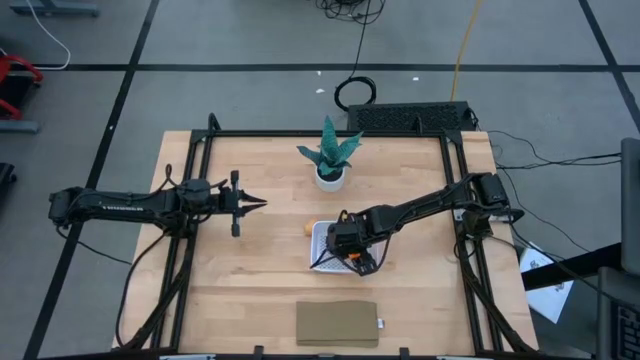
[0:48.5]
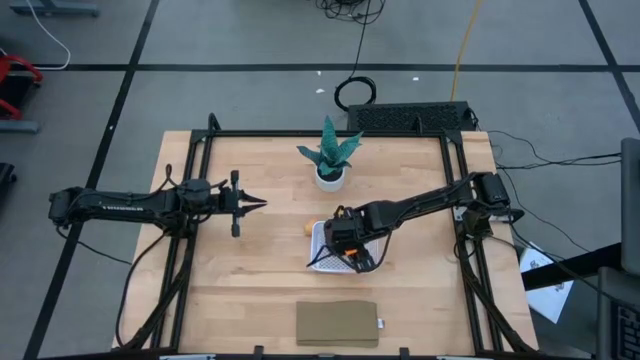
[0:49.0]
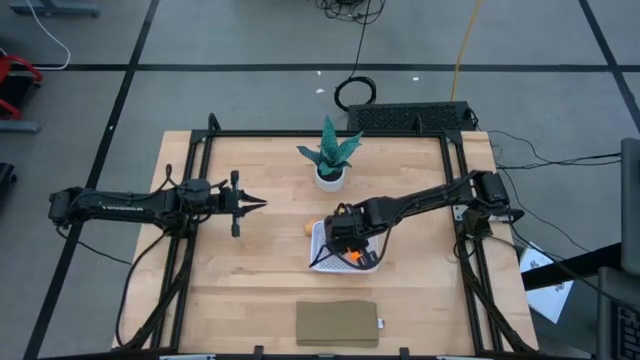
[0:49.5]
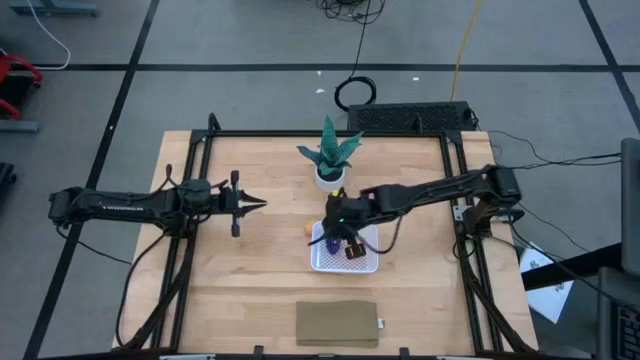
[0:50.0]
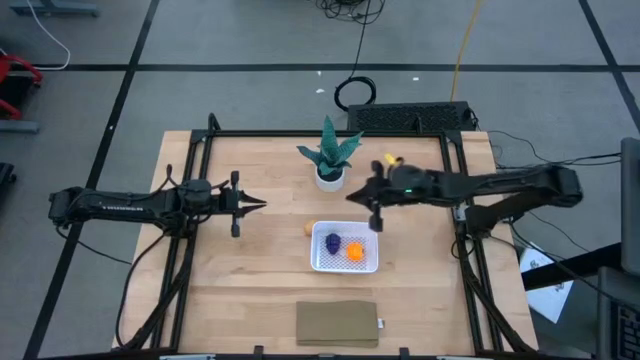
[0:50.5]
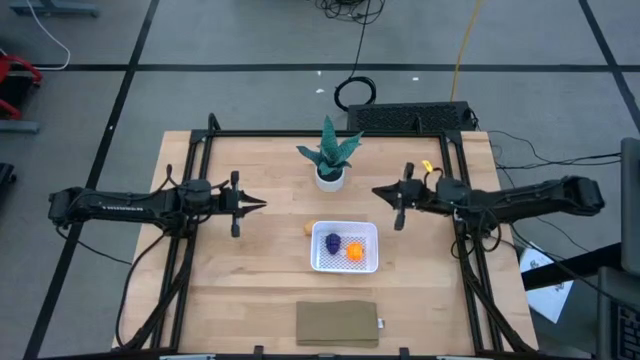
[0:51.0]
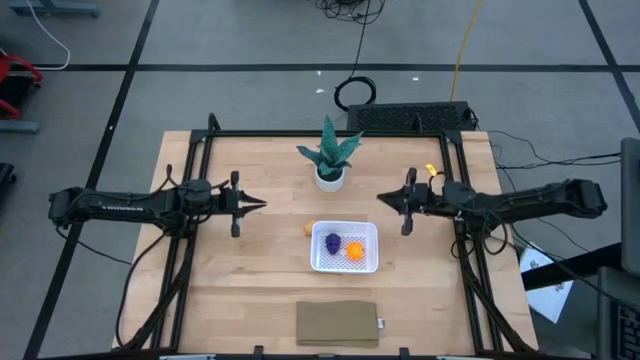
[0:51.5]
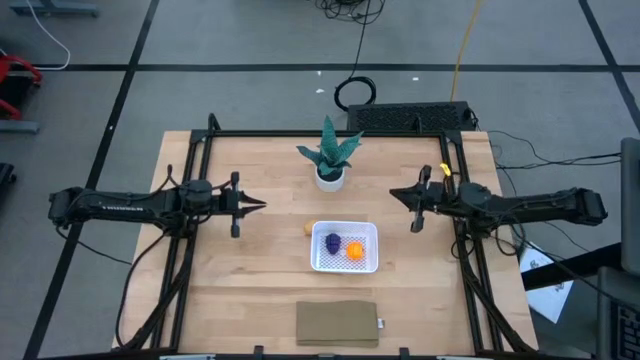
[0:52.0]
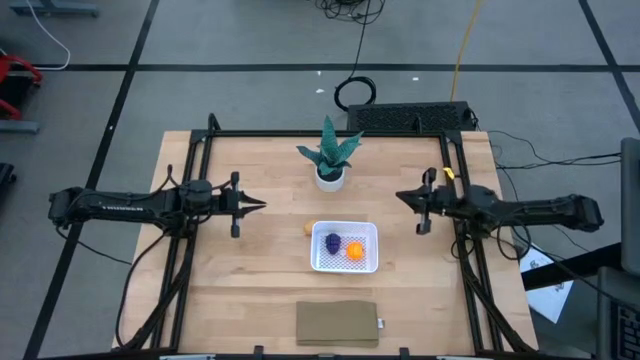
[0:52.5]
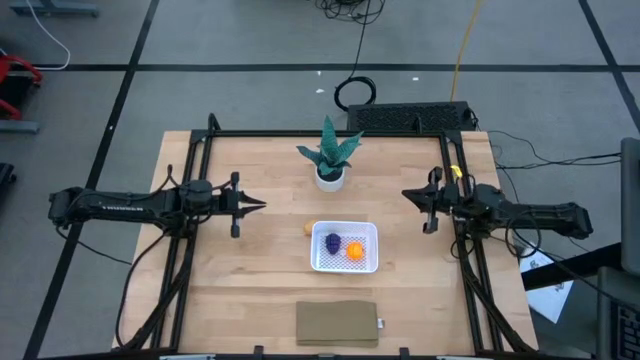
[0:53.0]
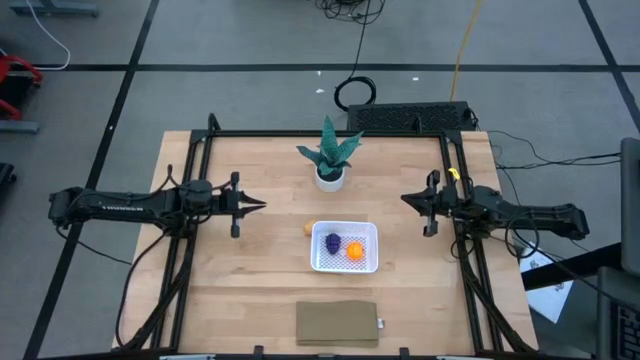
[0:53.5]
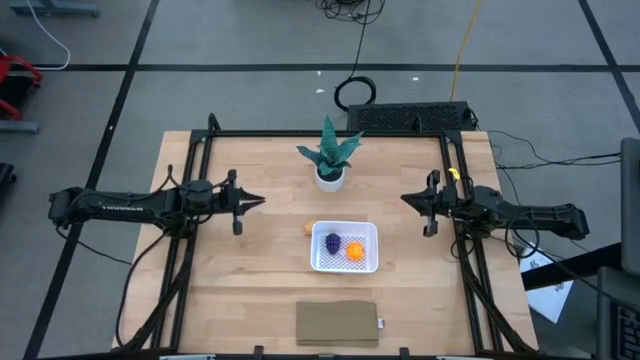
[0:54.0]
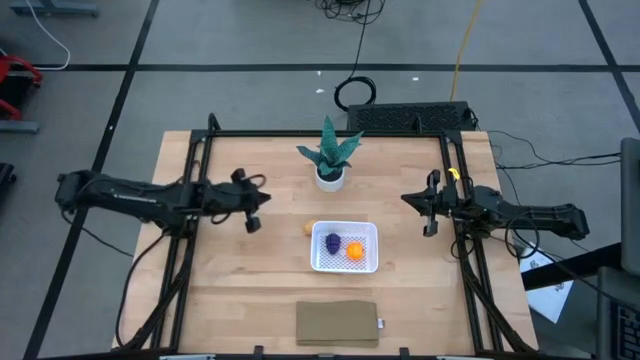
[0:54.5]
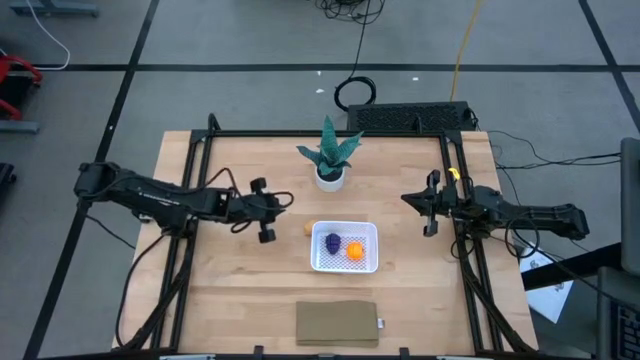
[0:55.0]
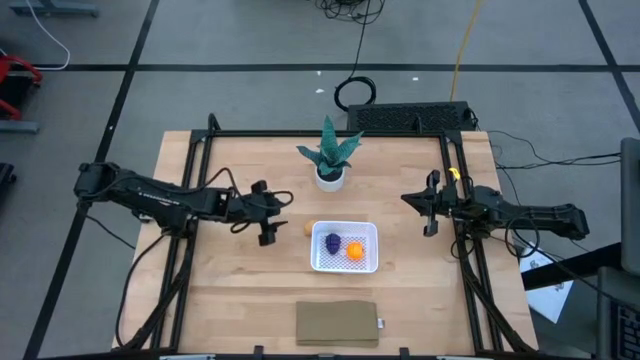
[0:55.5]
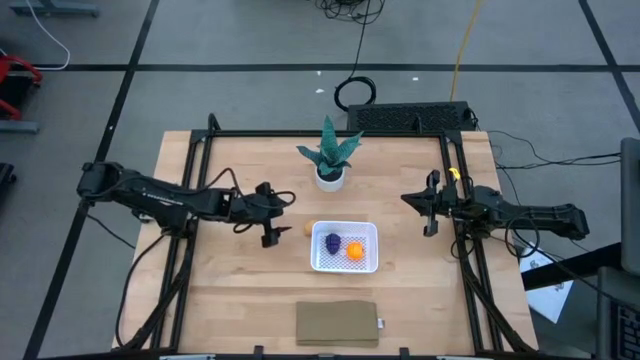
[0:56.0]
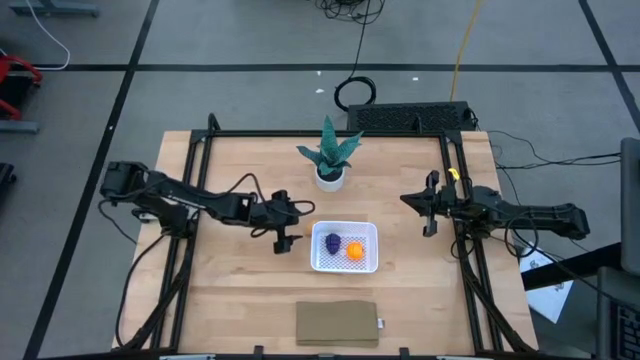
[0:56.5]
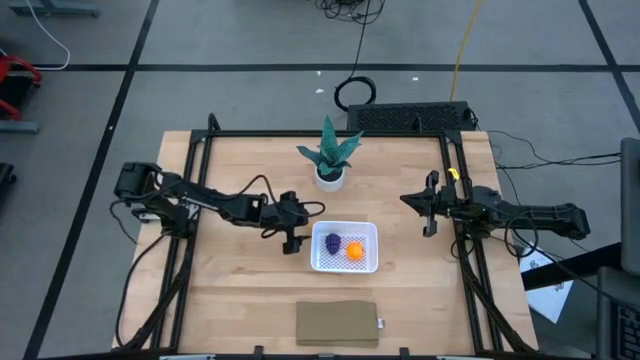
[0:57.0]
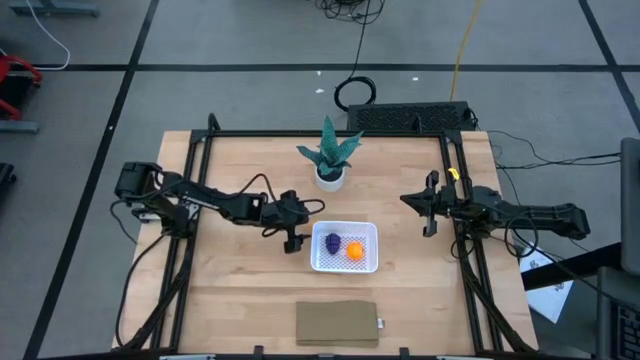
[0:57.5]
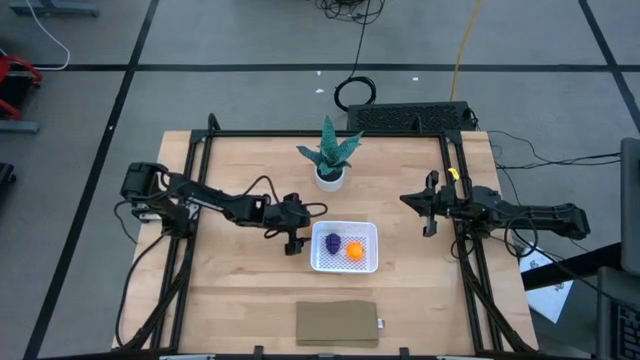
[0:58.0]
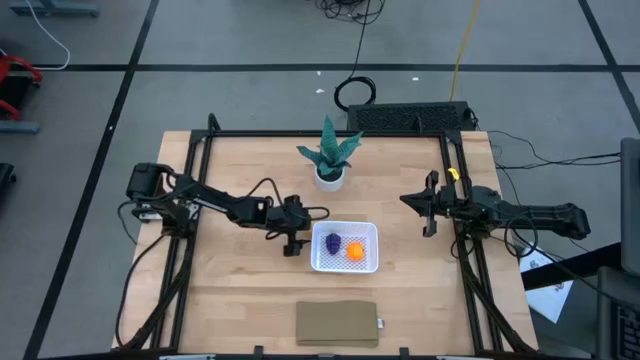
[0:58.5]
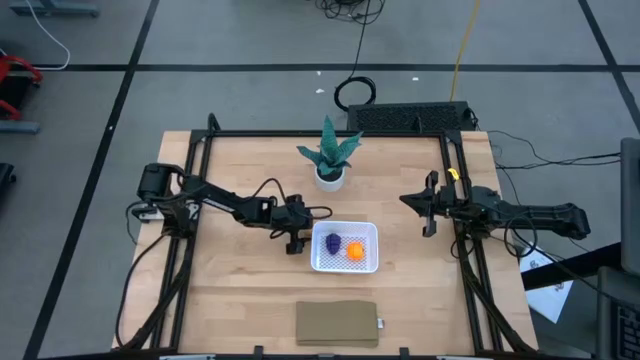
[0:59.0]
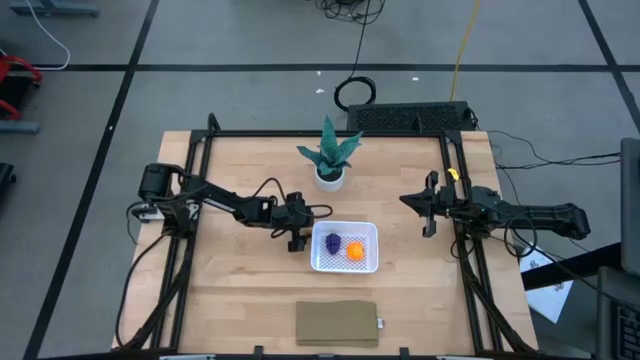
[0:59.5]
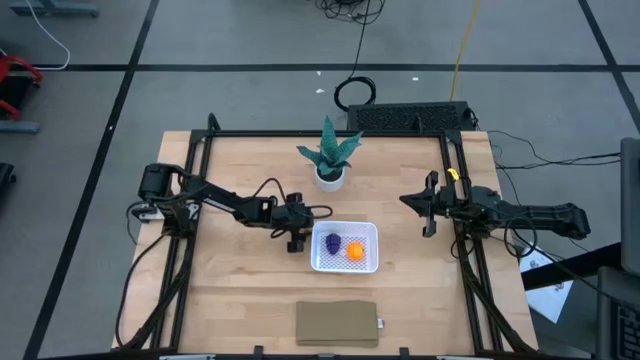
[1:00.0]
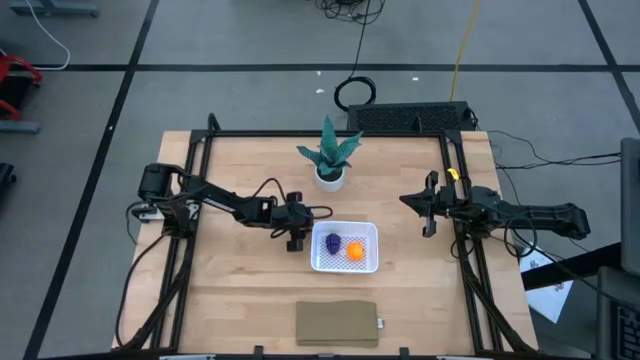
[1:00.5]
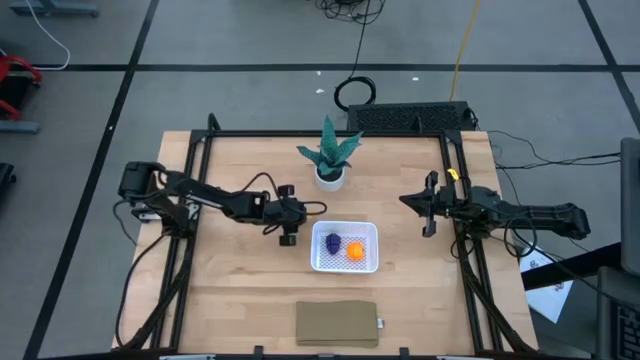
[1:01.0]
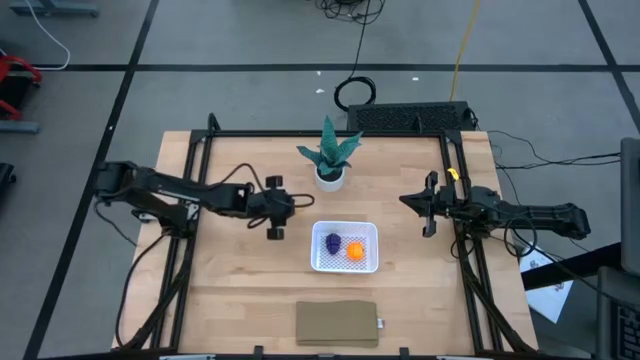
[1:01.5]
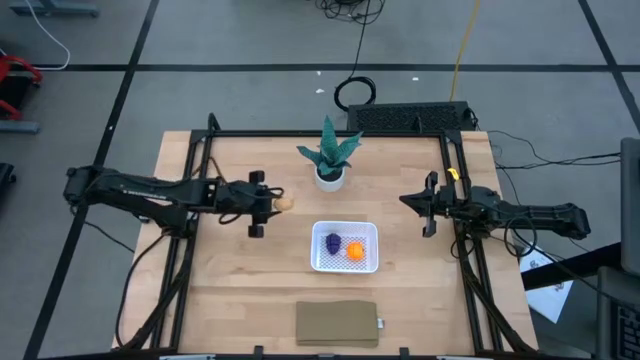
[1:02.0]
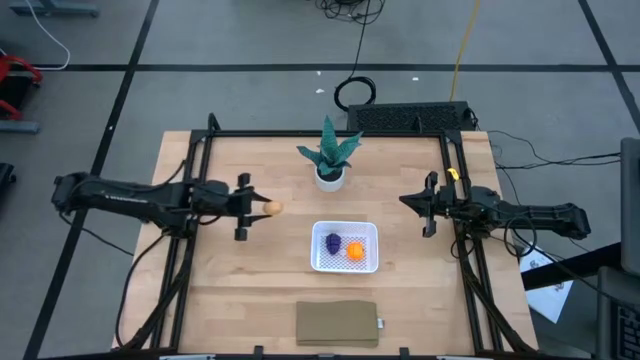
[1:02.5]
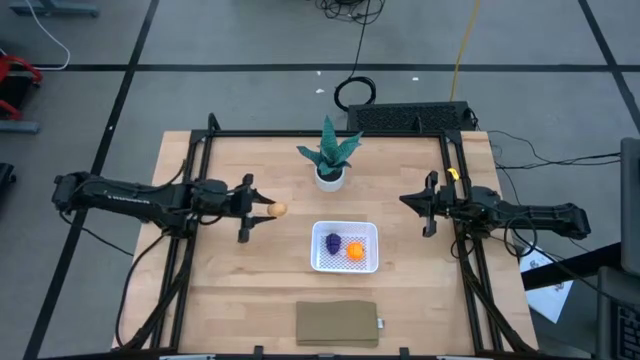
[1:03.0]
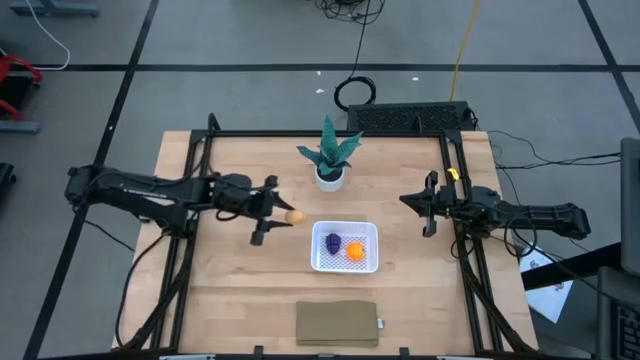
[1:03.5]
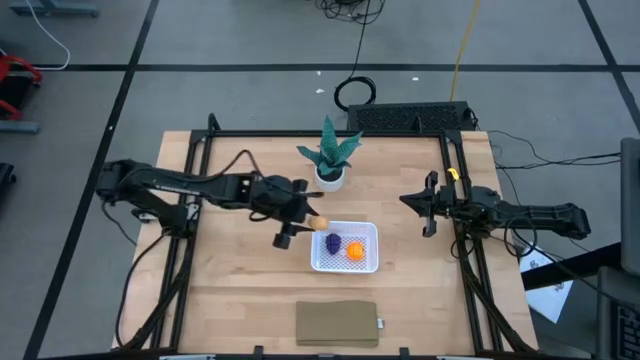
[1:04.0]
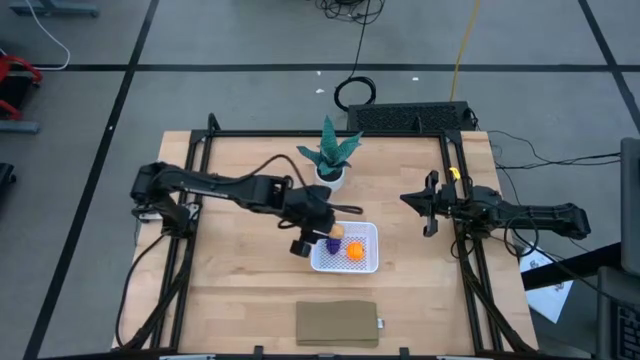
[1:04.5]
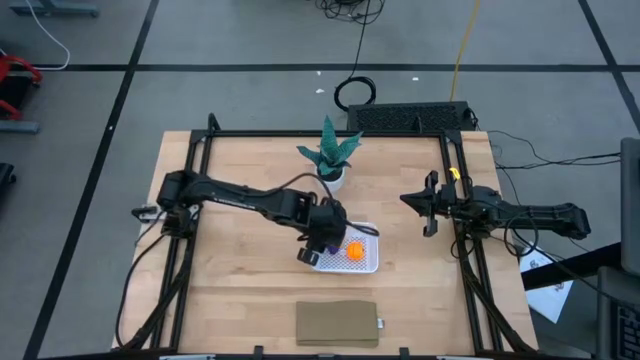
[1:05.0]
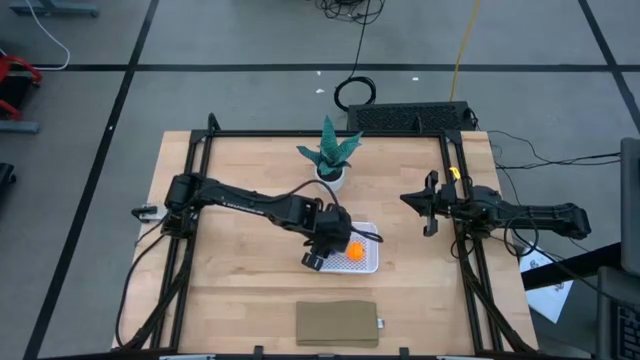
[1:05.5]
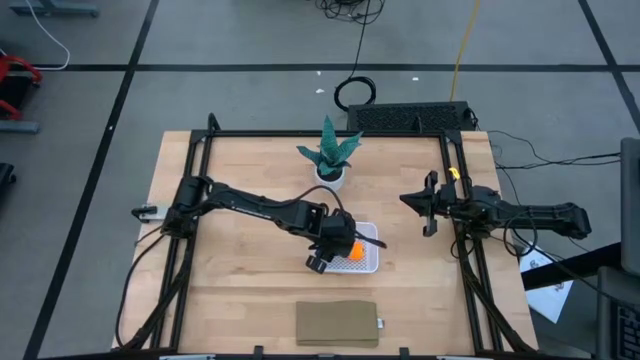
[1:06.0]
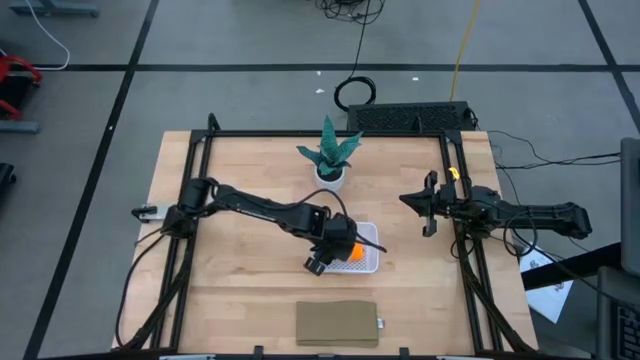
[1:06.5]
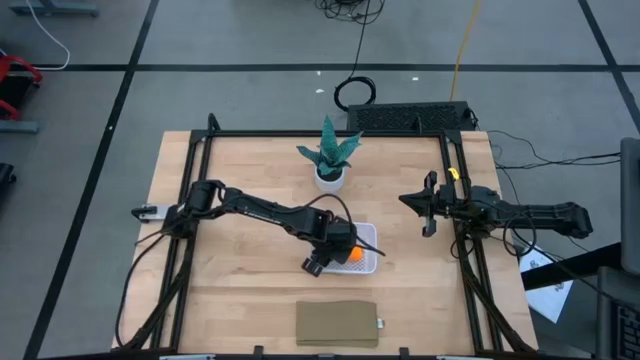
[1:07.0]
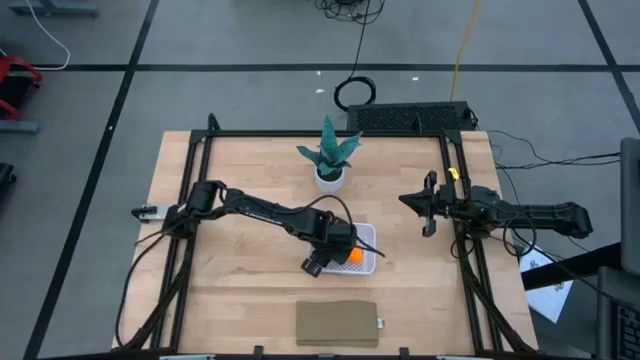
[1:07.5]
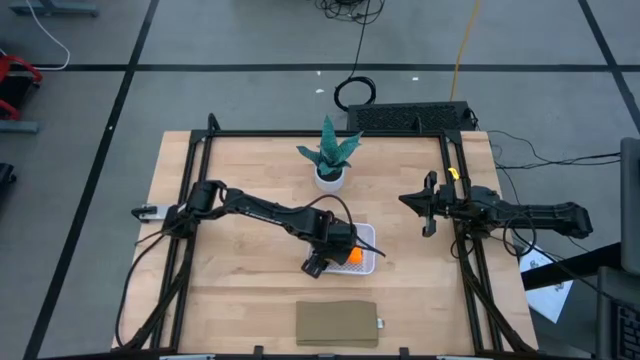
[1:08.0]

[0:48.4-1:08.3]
Task: Pick and placing Produce into tupperware
Put the brown potato into the white bin

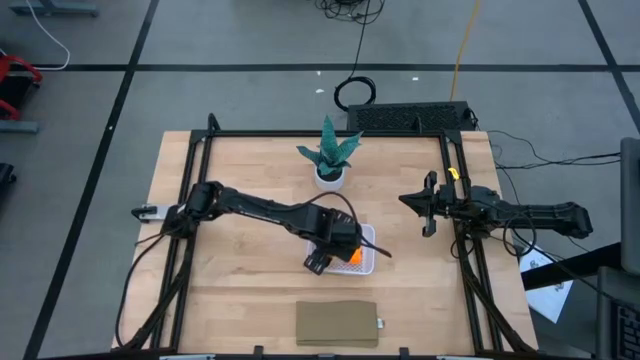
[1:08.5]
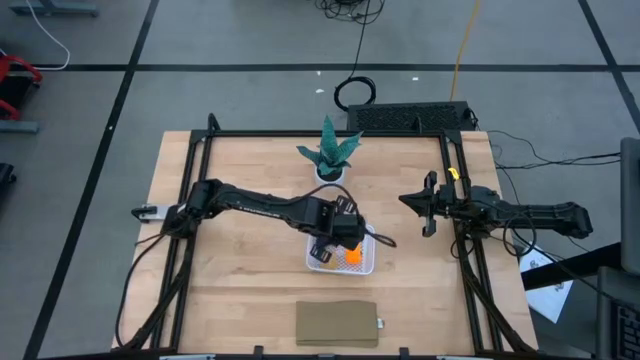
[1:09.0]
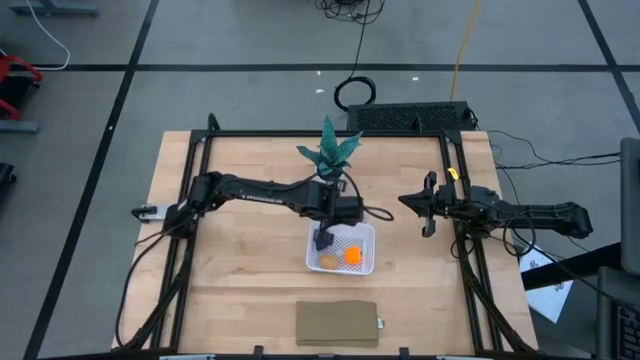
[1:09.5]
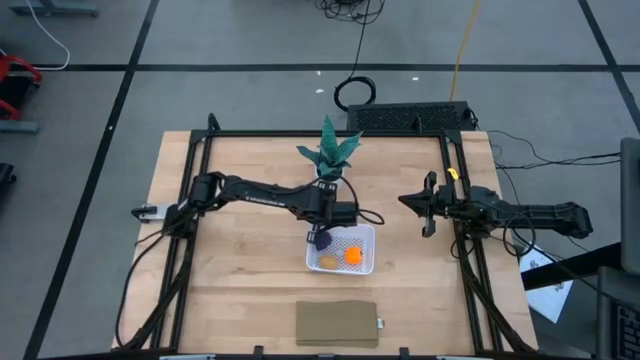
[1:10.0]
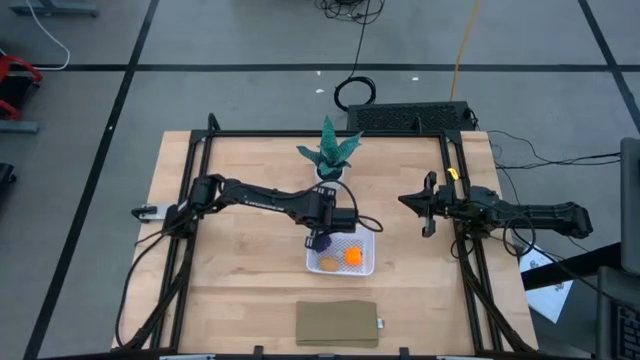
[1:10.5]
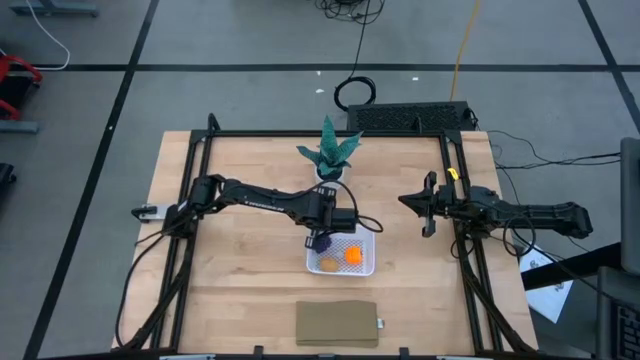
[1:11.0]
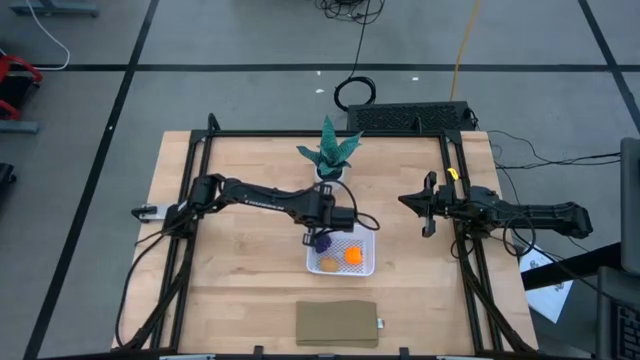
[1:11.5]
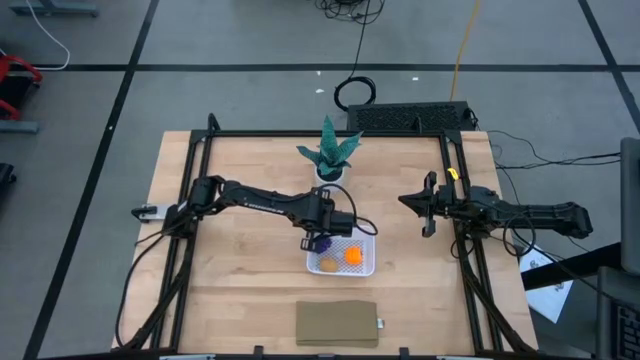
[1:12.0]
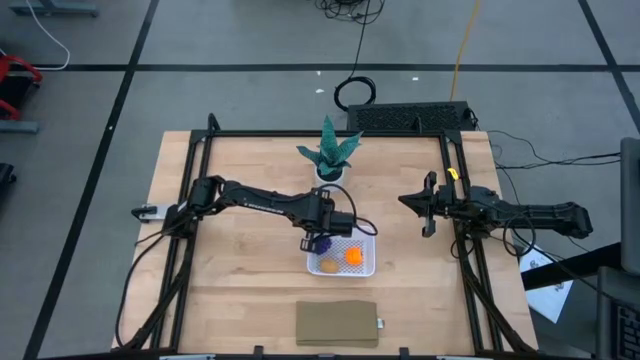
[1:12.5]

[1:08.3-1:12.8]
Adjust the white bin
